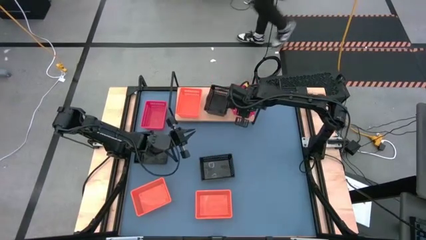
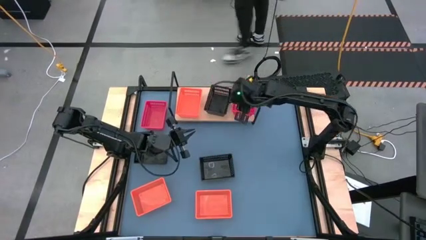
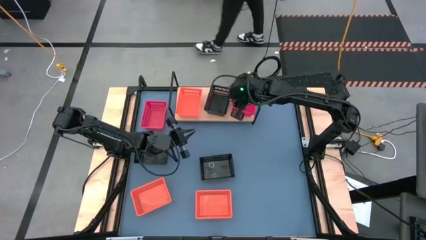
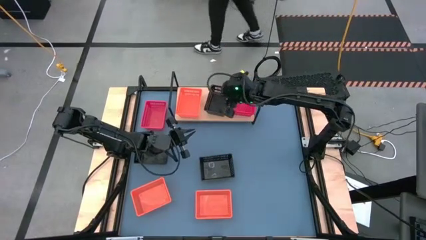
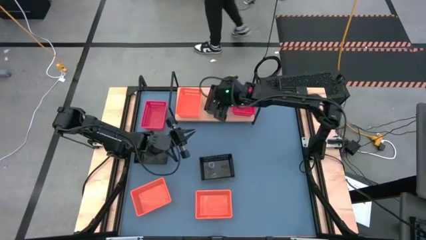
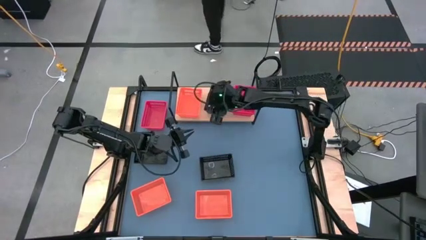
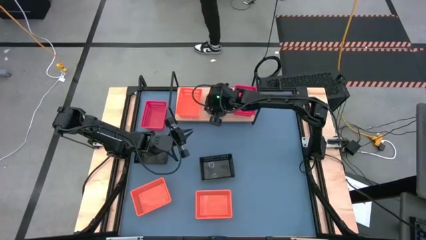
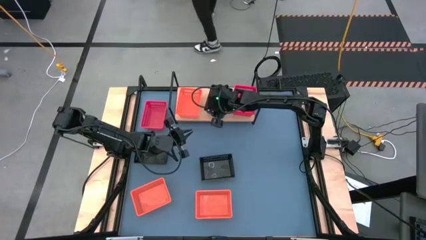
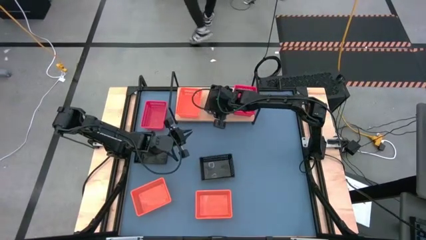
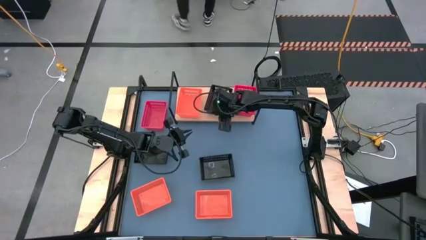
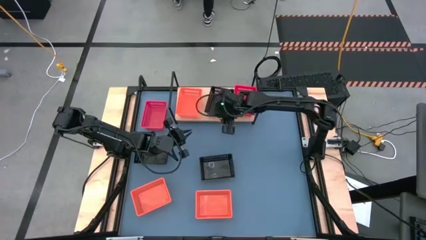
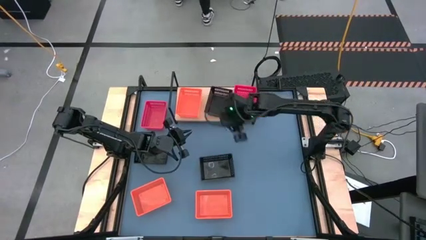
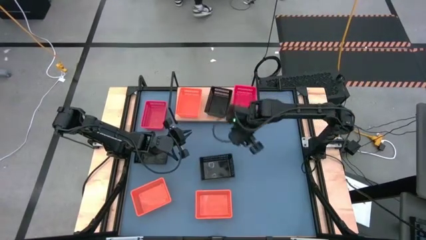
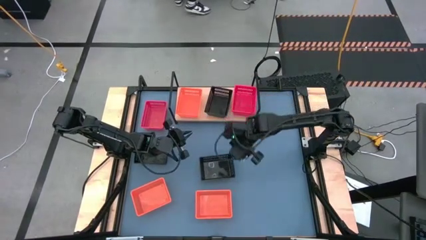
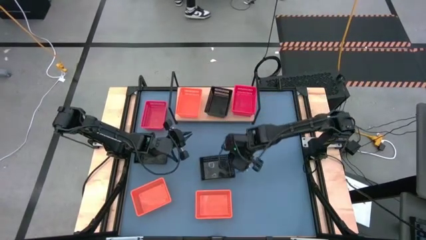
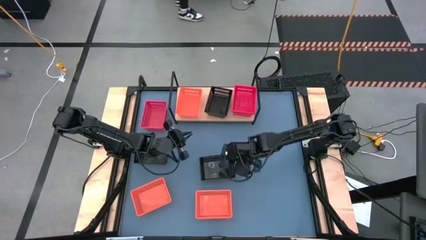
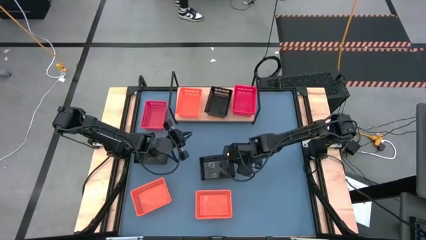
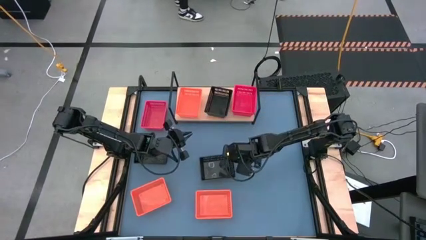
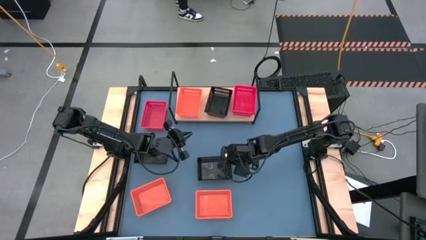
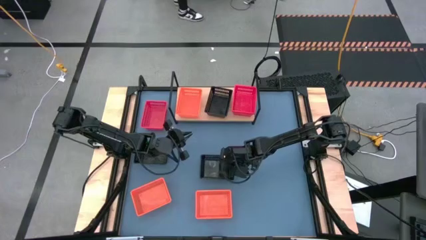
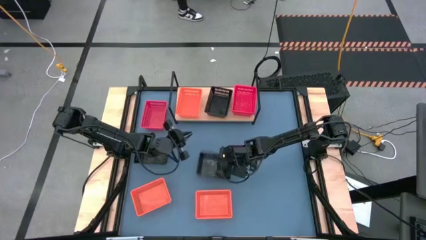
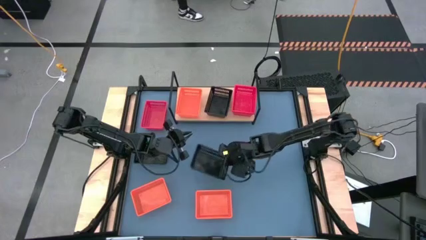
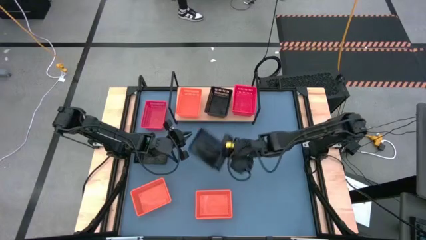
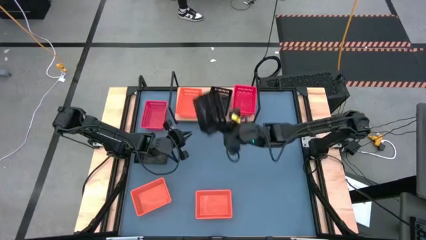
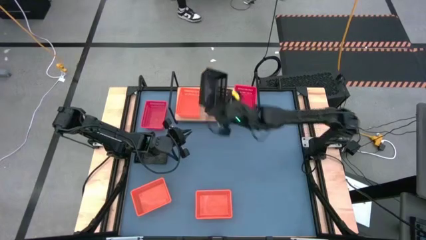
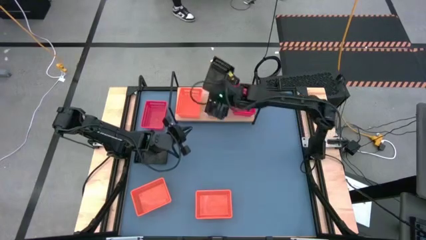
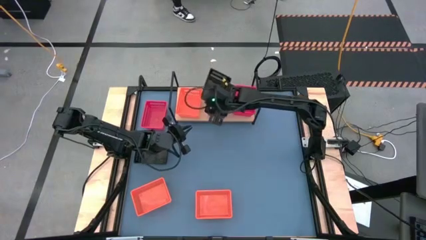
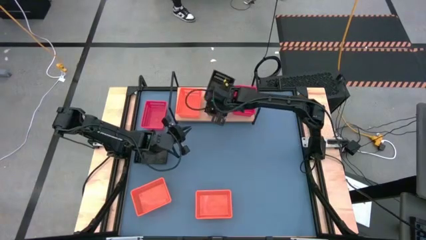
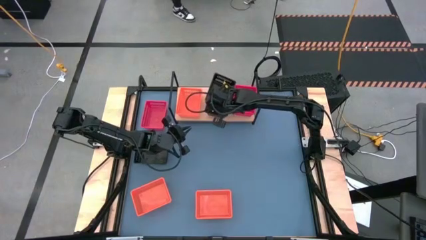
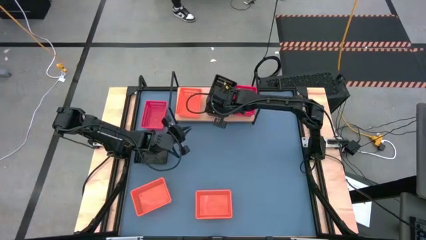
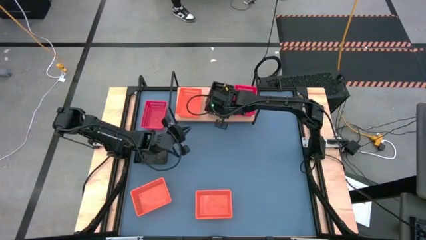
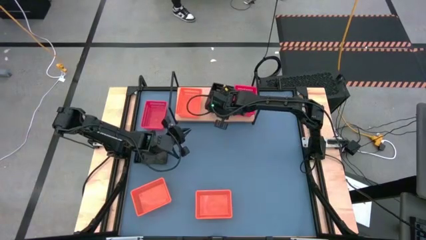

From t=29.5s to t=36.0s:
Task: Stack baskets on shelf by color
Stack the right black bin on top of the black bin on the shelf

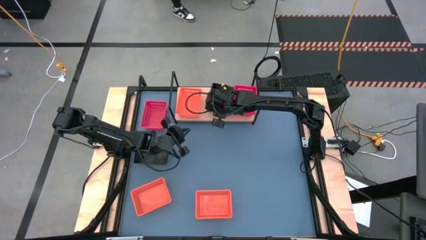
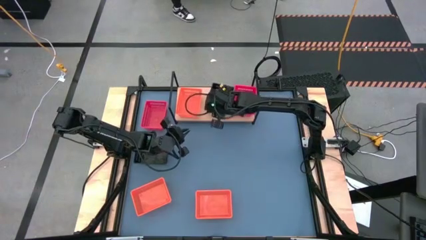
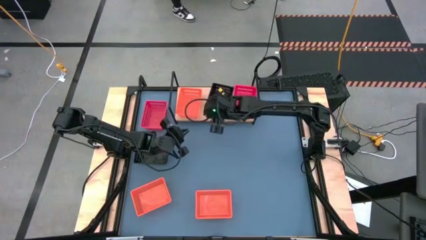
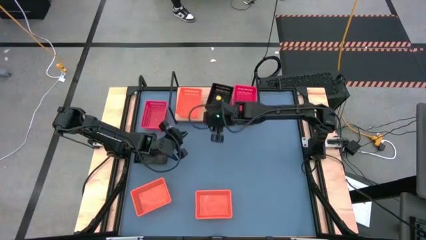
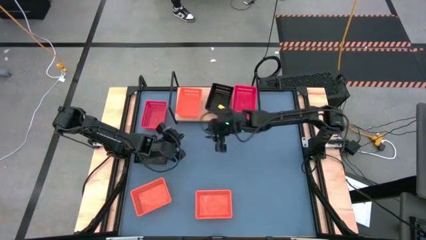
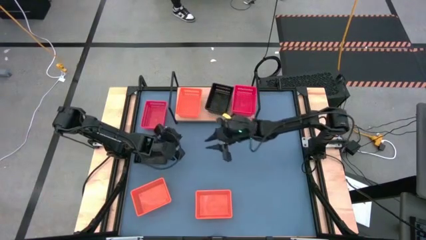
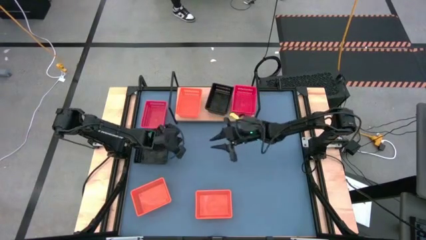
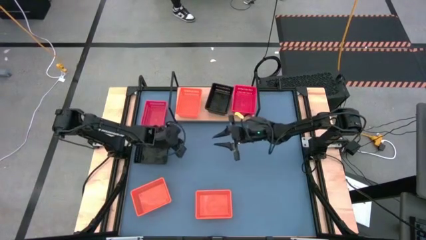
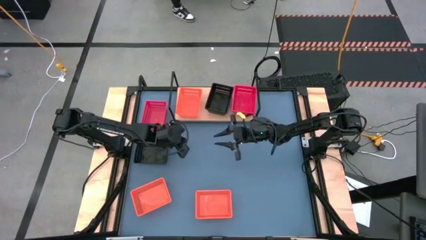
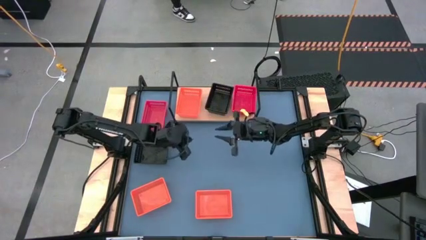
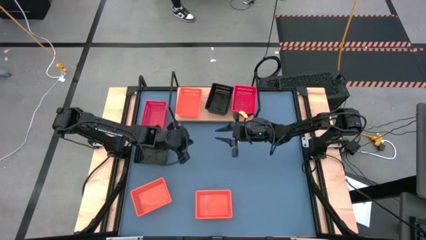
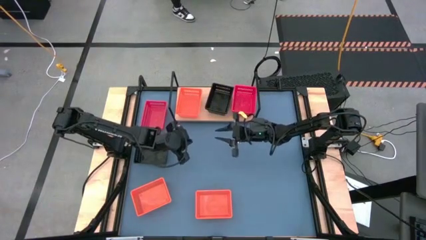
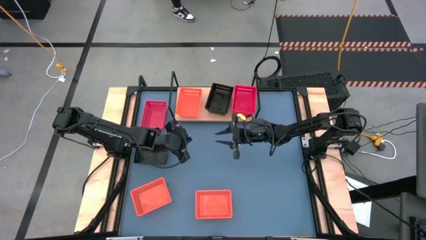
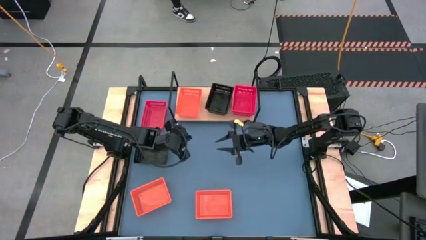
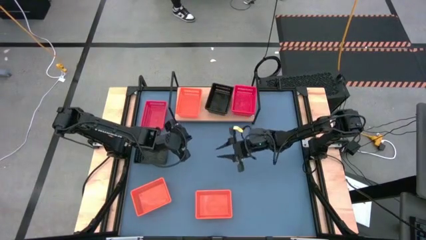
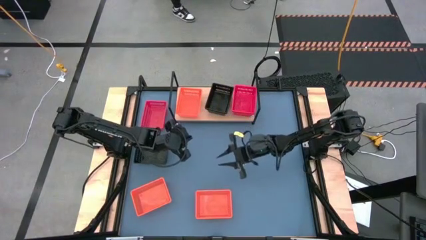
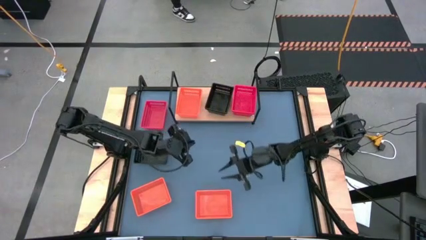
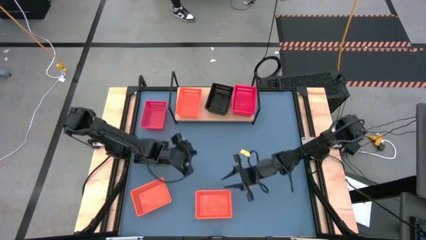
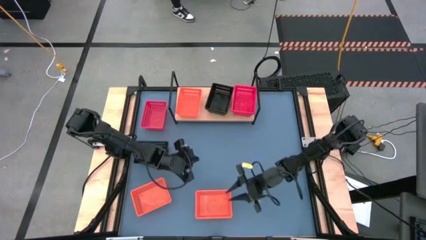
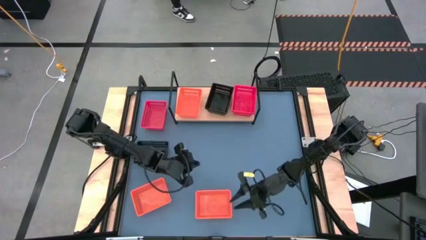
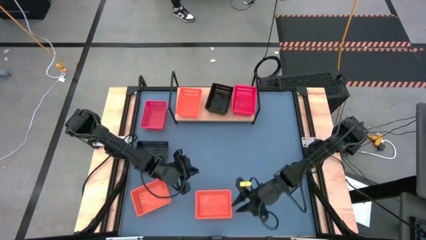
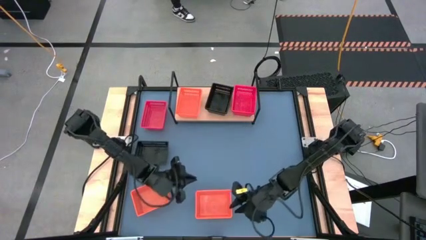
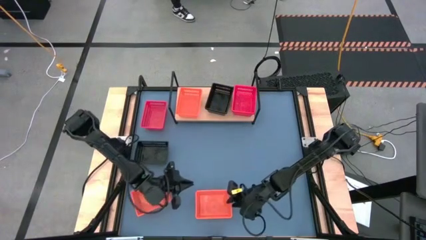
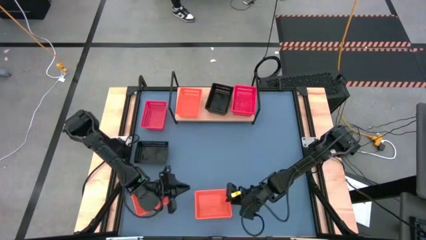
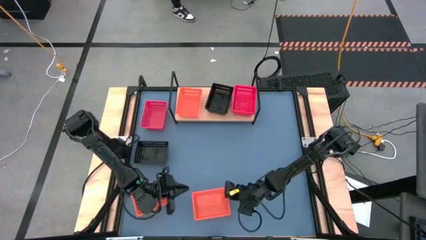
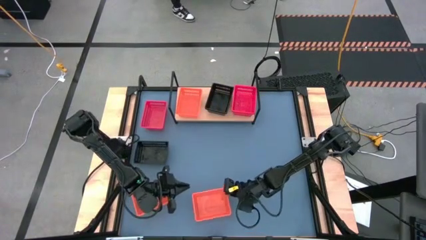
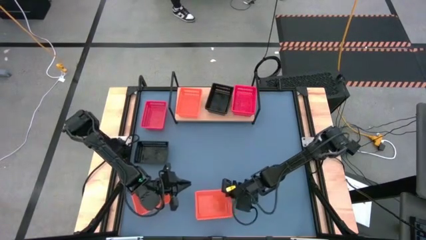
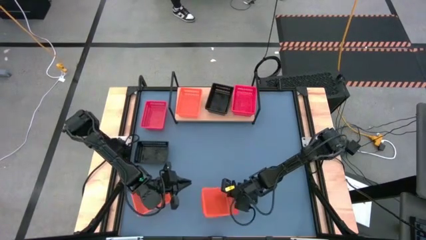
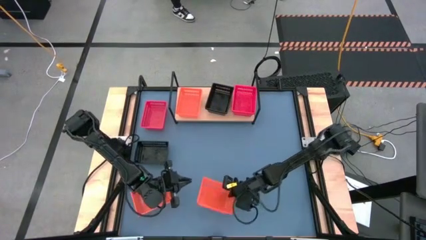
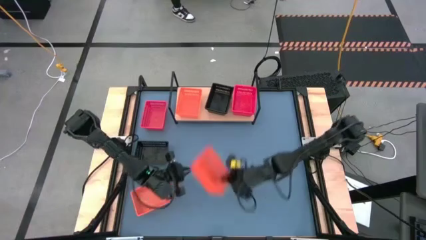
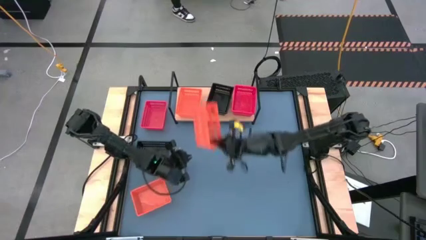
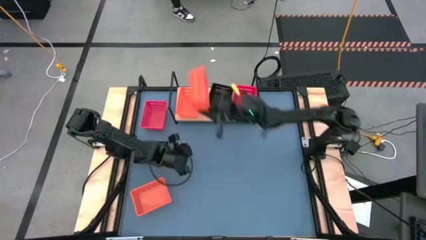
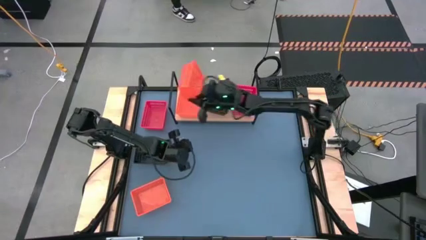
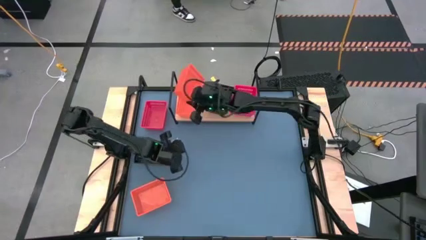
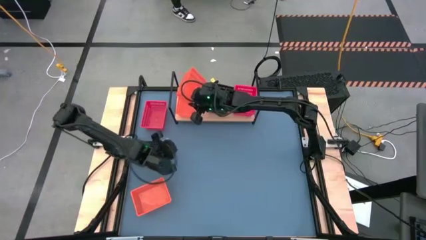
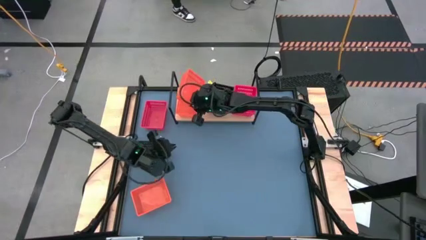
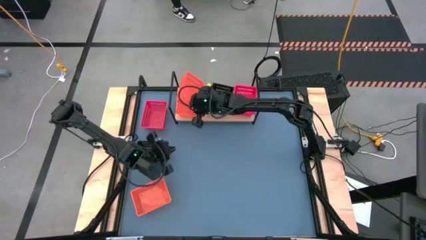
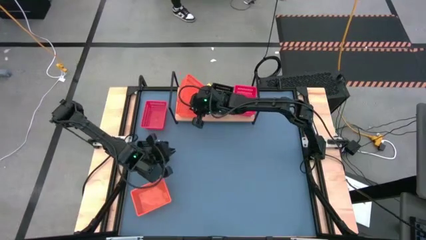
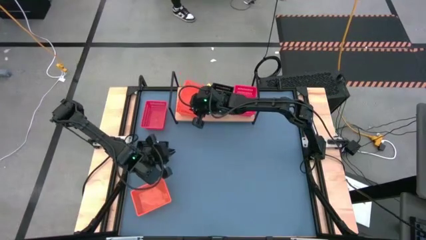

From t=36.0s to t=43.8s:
Stack the right orange bin on top of the orange bin on the shelf

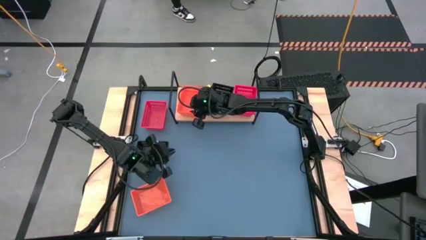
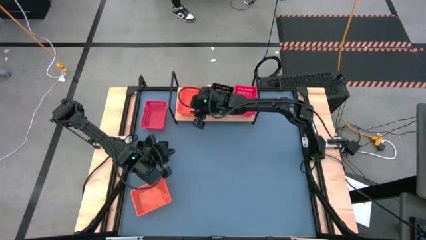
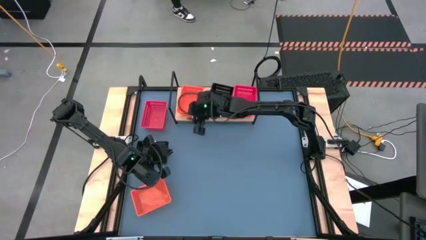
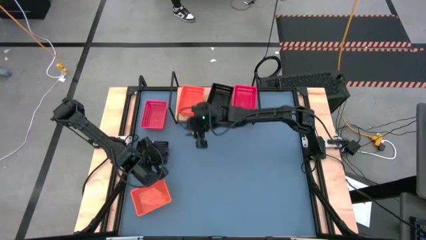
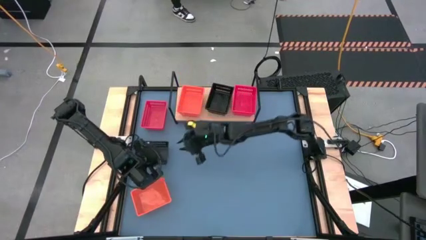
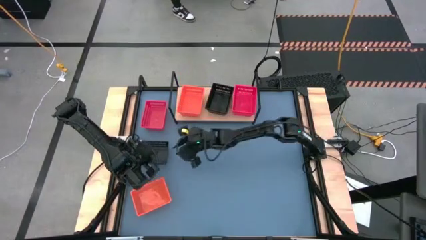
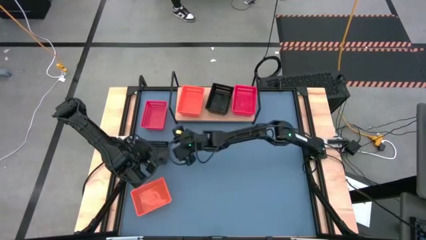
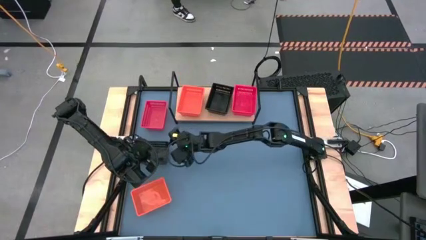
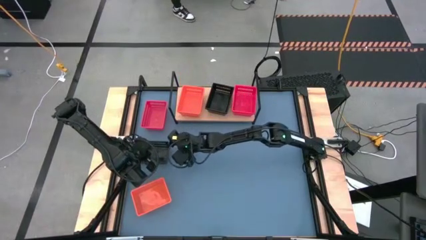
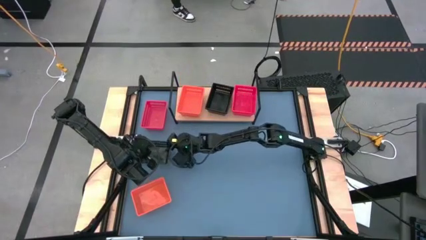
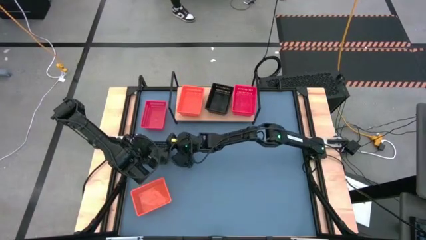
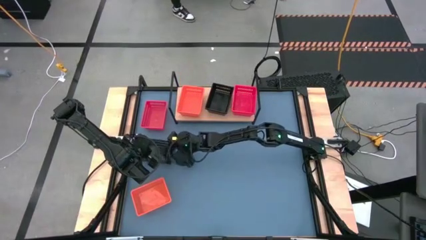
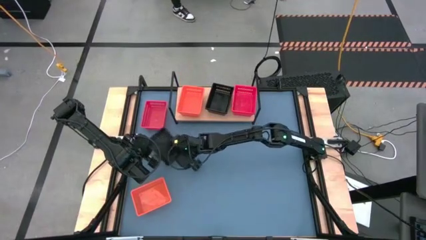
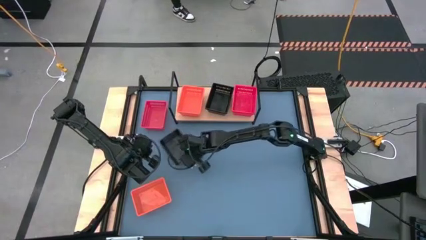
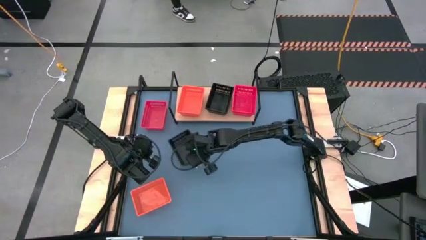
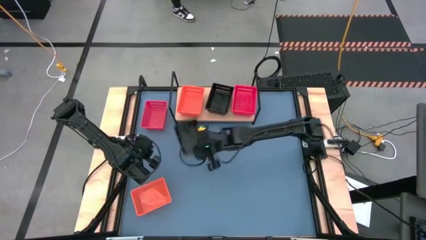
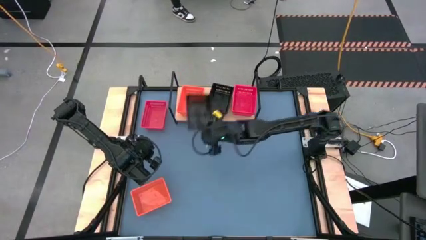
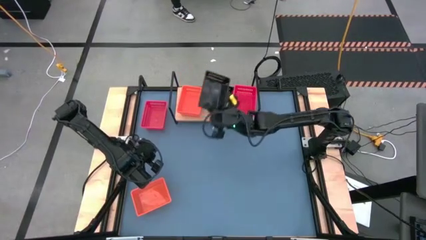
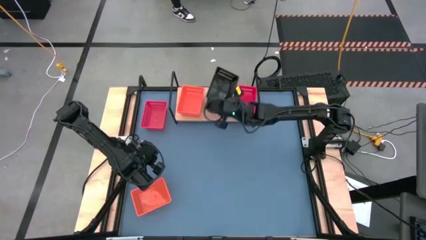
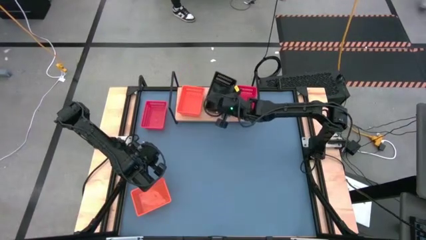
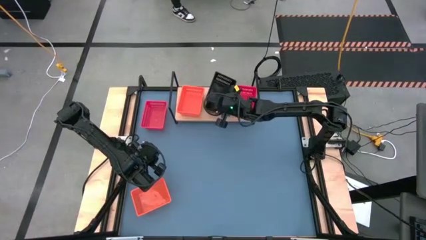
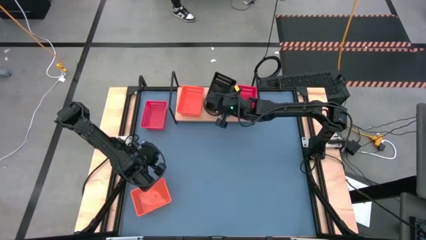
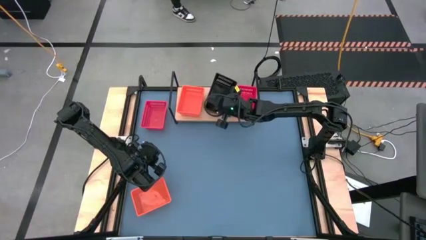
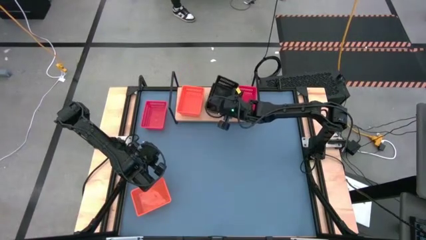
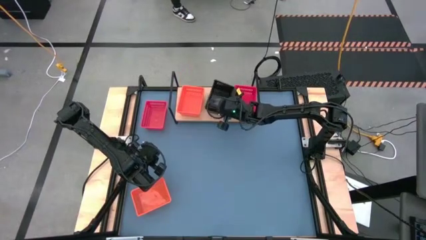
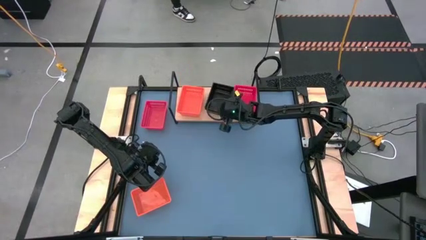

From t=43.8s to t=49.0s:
Stack the black bin on top of the black bin on the shelf
